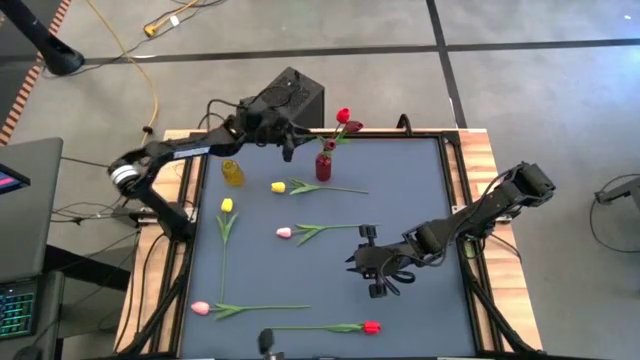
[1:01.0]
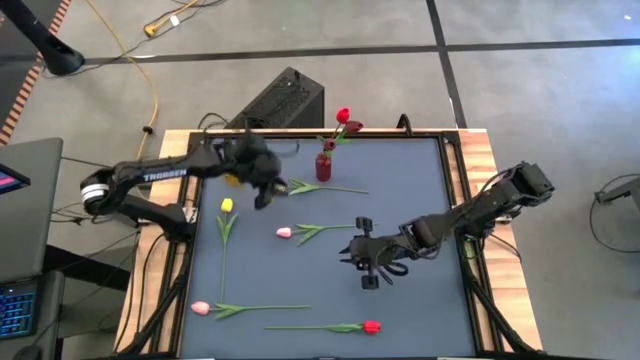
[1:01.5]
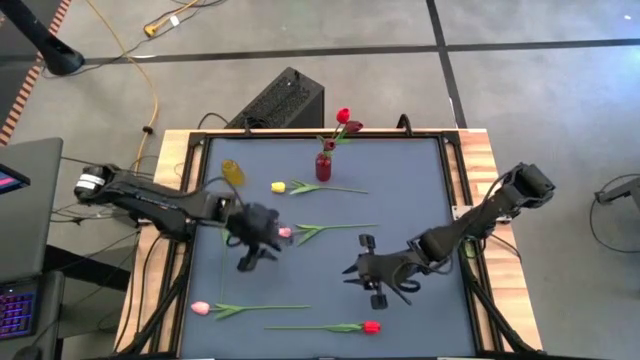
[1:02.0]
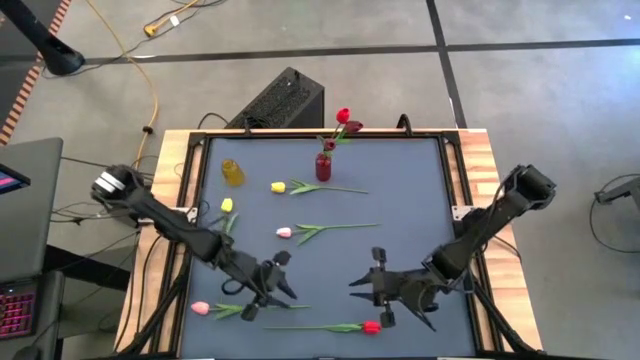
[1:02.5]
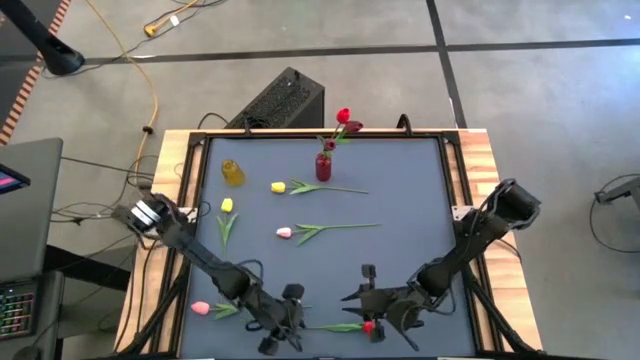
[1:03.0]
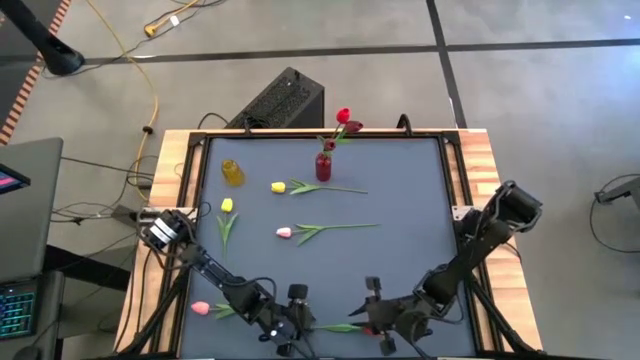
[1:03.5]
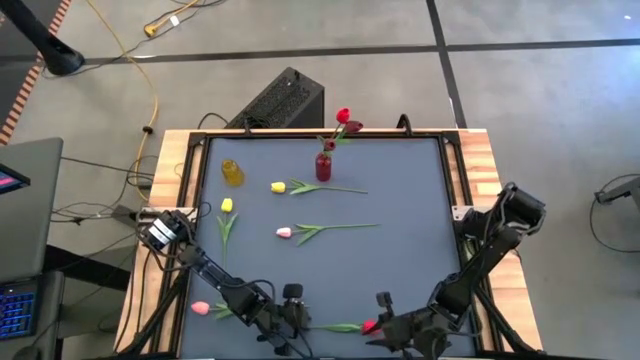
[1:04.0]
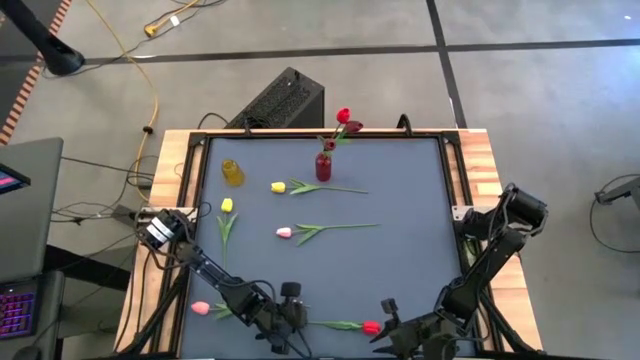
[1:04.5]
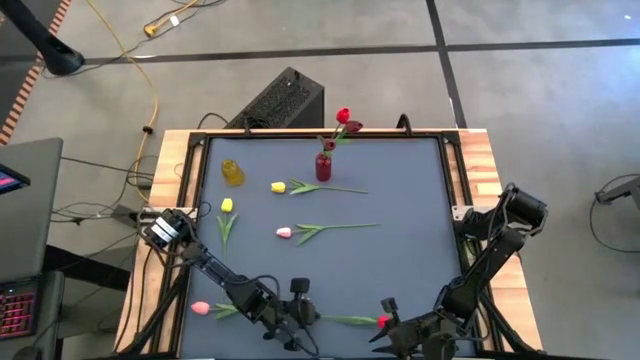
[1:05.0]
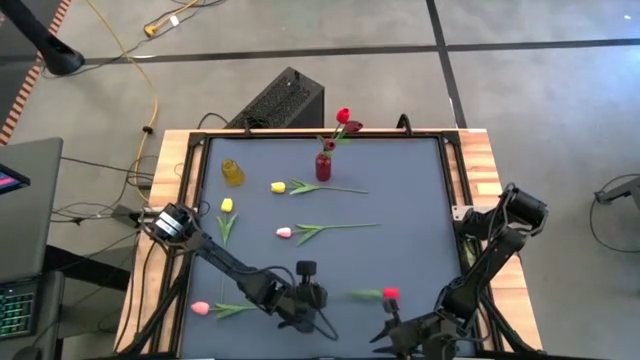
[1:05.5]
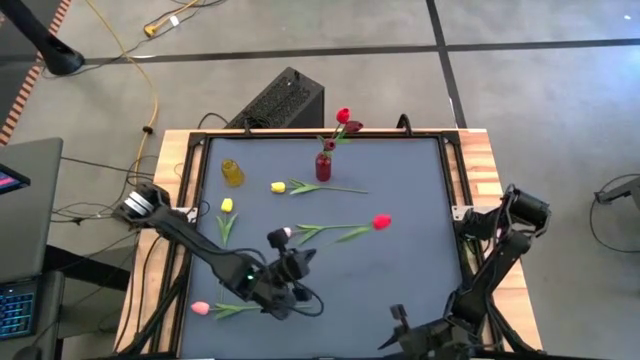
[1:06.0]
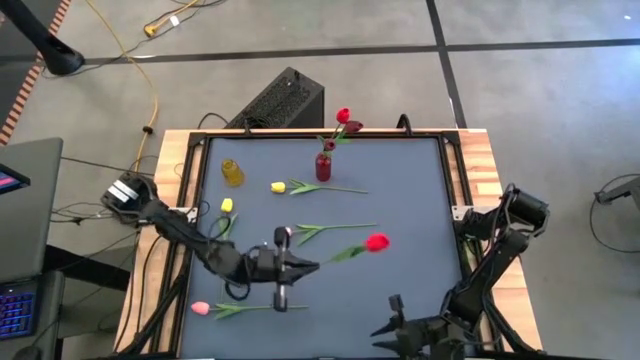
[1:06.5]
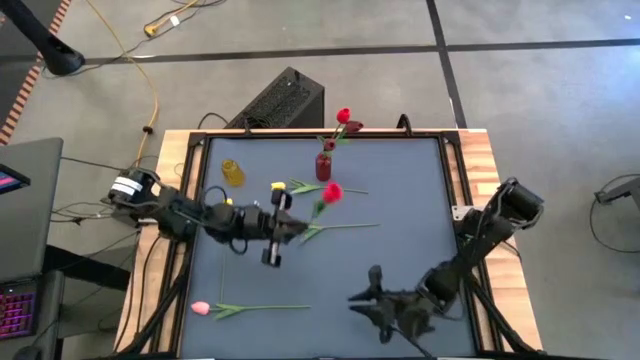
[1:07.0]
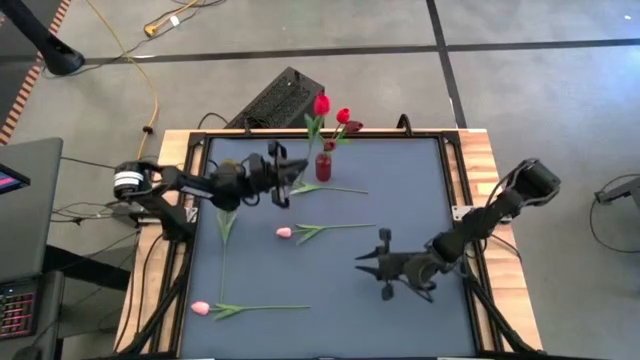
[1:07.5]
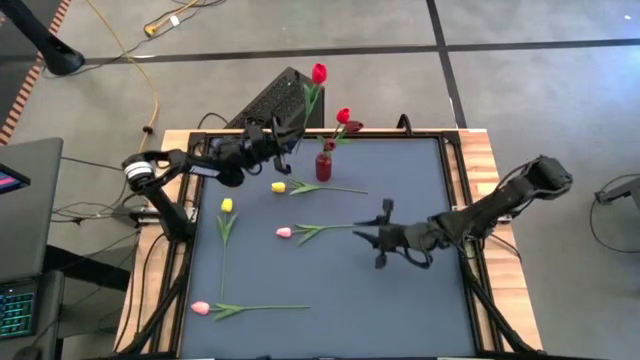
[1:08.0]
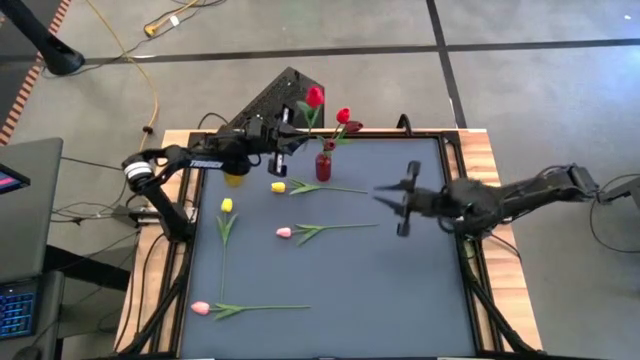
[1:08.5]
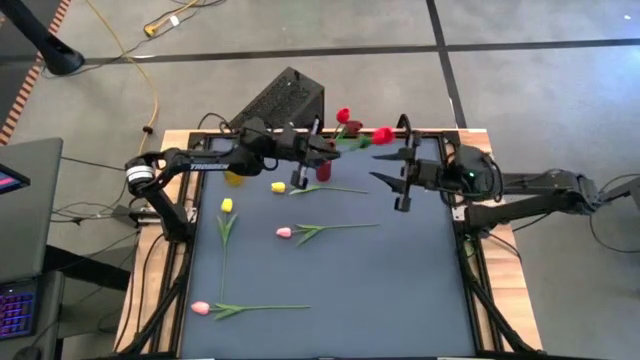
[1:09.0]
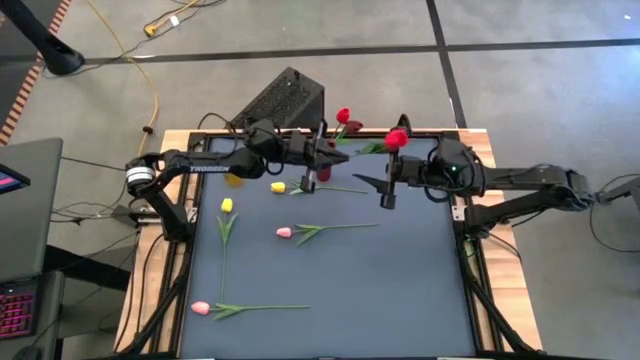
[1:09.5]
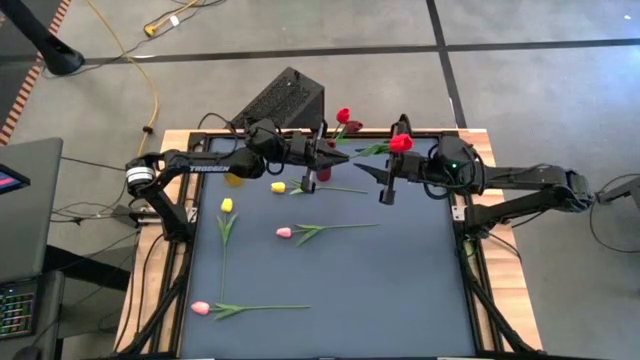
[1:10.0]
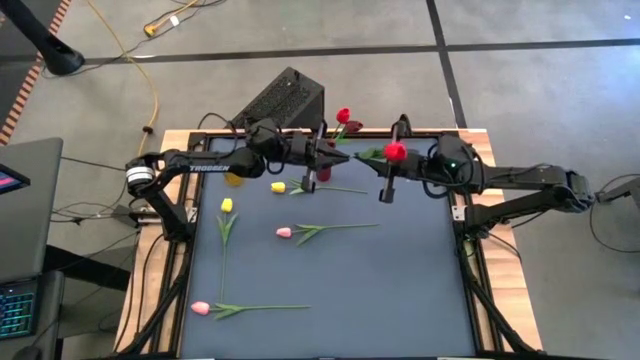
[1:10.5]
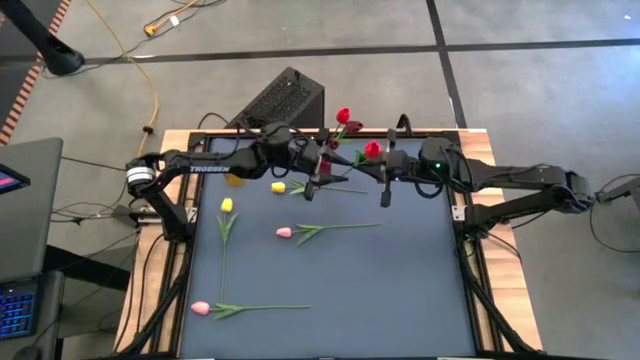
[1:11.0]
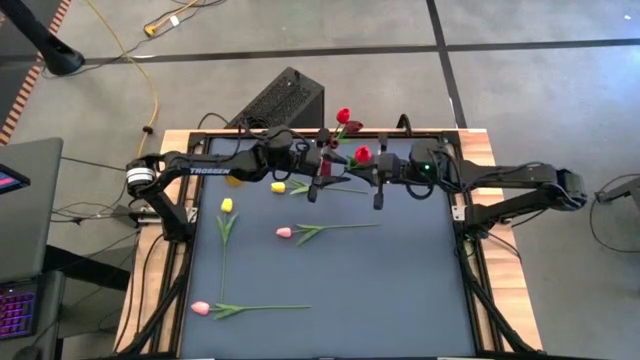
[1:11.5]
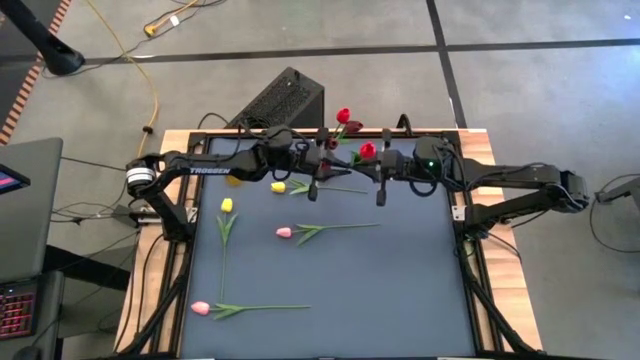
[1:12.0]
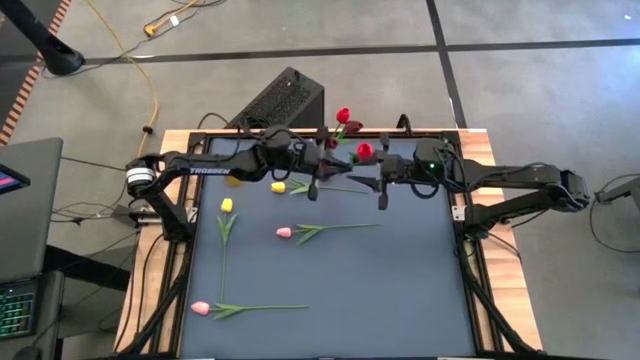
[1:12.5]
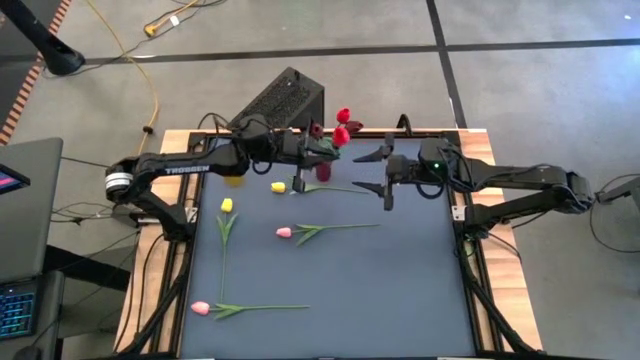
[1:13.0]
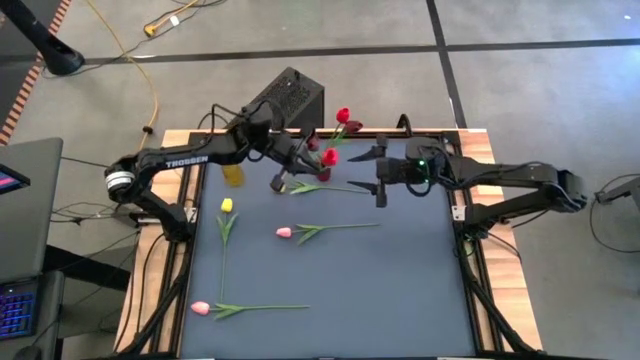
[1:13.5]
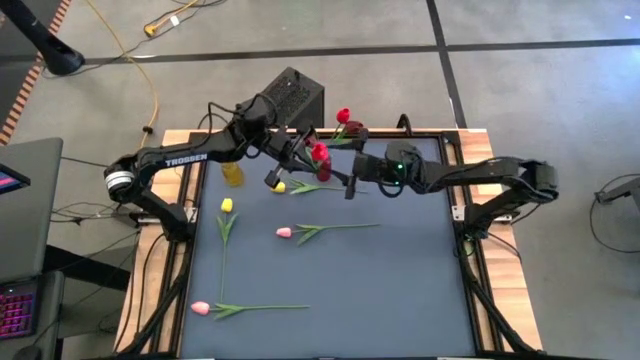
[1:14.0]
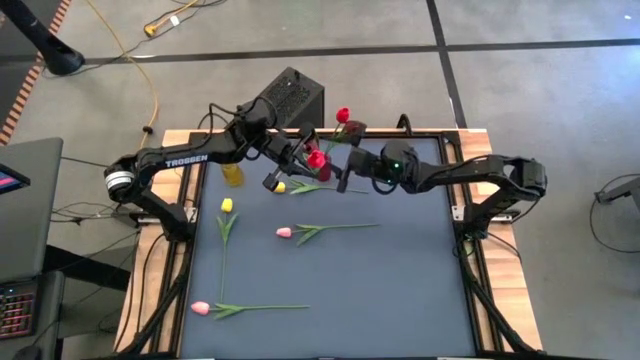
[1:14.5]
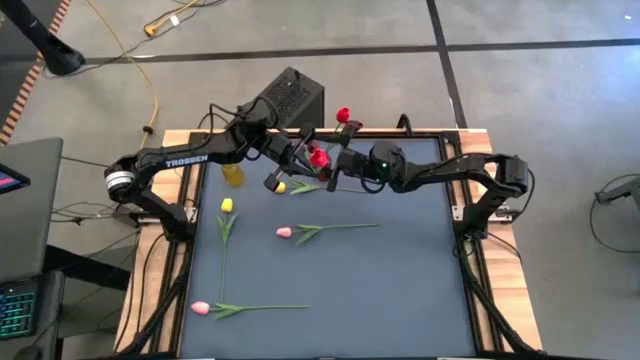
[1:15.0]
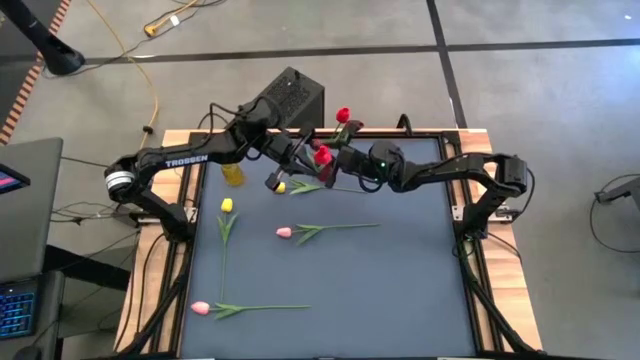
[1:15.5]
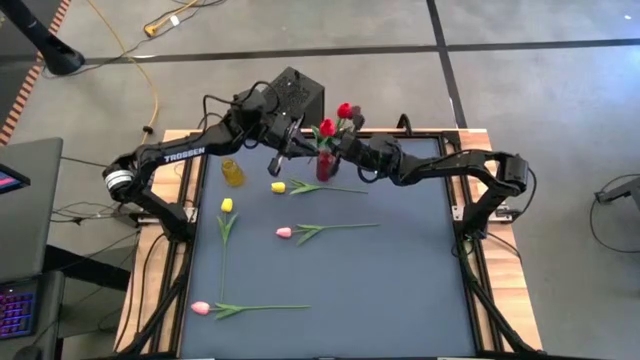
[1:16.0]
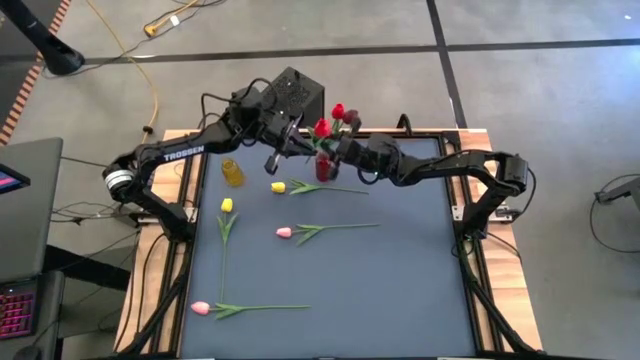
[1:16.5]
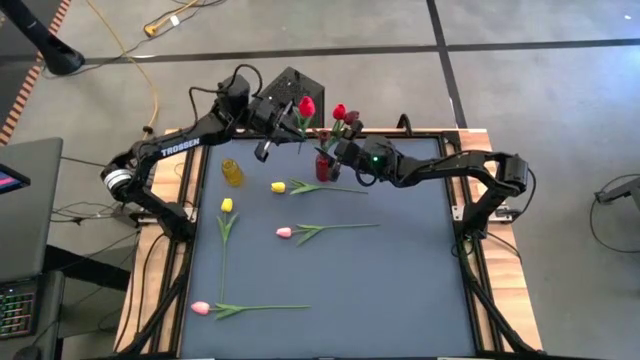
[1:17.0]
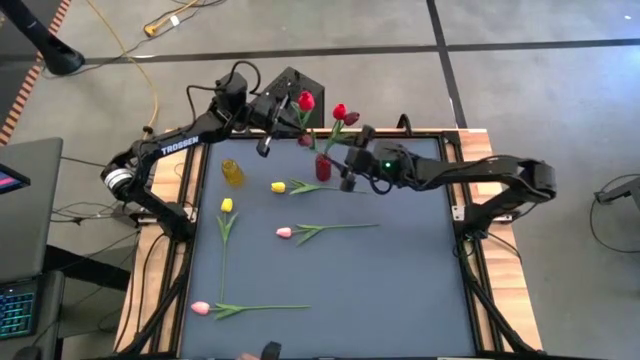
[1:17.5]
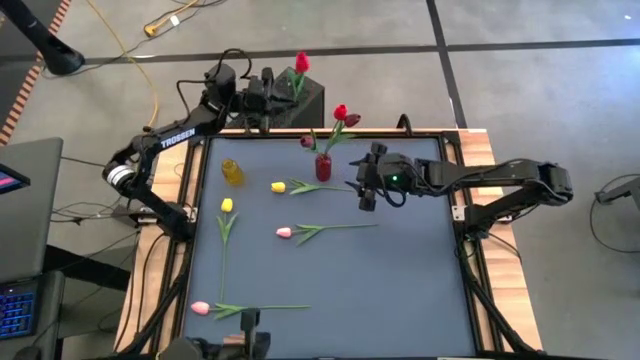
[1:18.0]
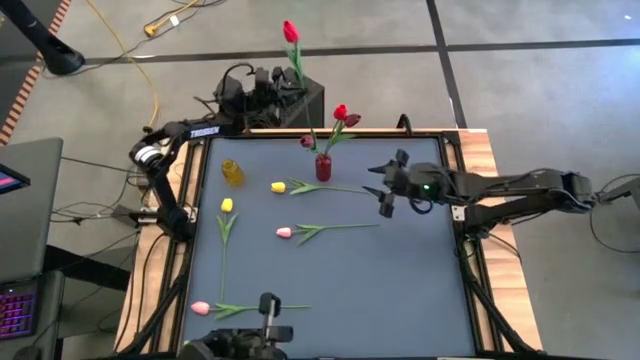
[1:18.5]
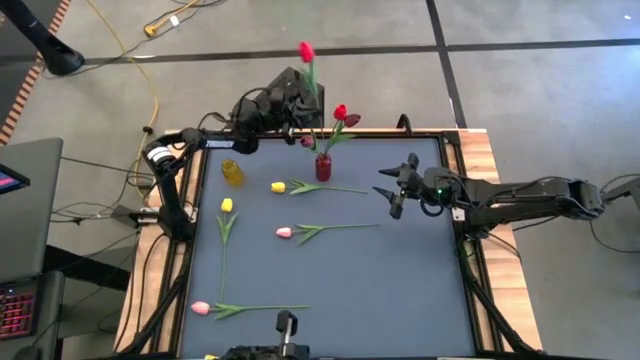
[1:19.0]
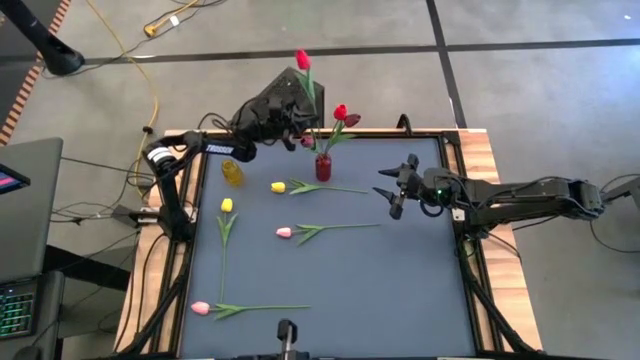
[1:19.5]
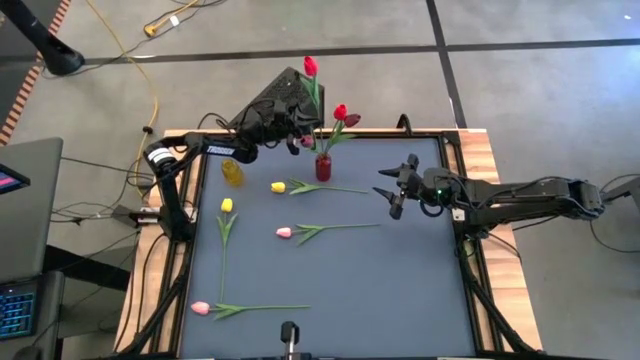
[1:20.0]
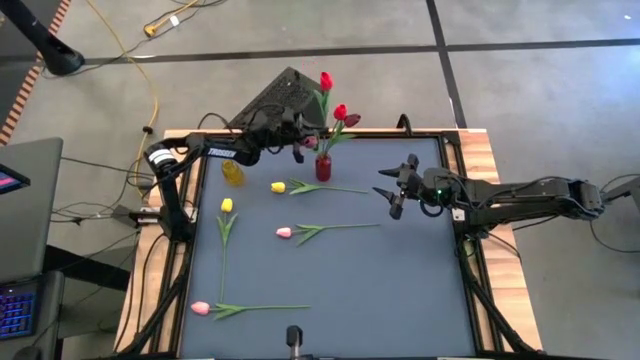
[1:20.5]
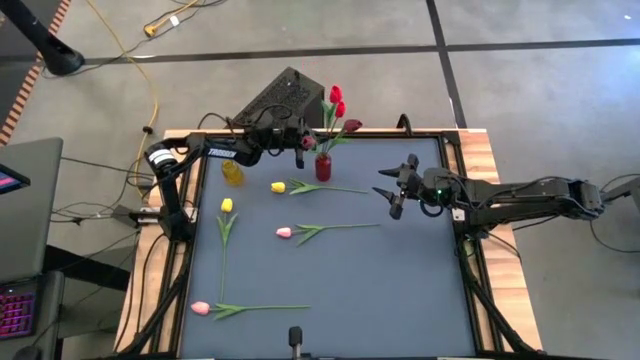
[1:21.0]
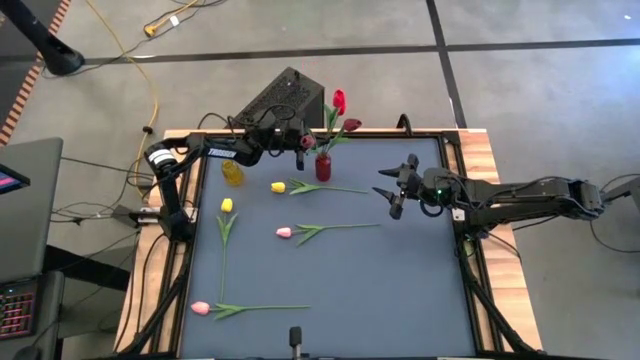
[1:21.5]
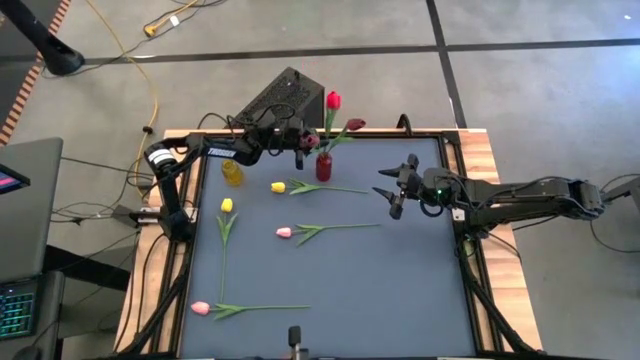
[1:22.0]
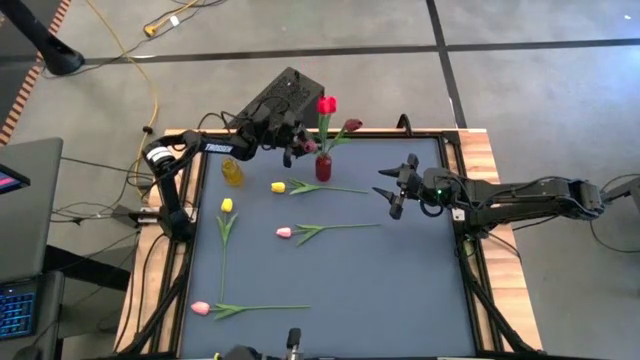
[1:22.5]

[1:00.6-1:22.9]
Task: Sort flowers into vase by color
Put the red flower into the red flower vase
